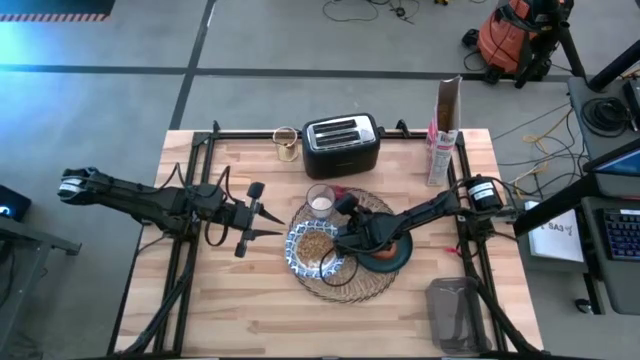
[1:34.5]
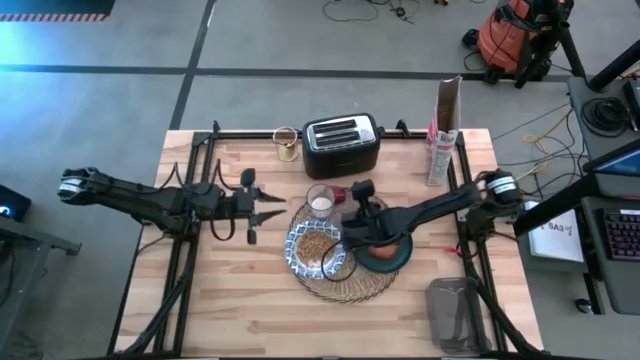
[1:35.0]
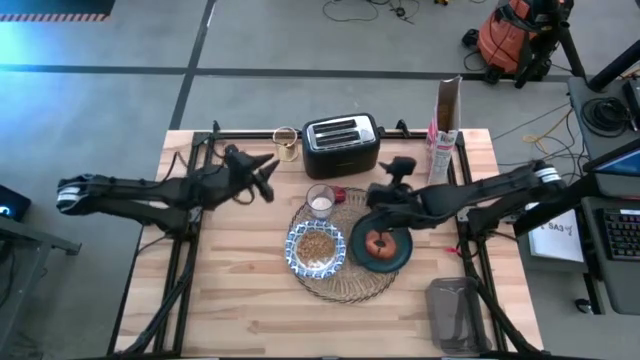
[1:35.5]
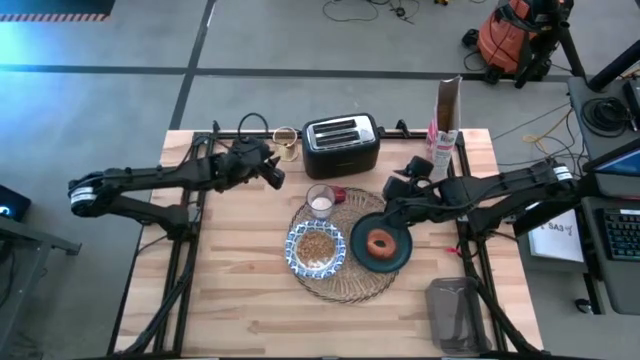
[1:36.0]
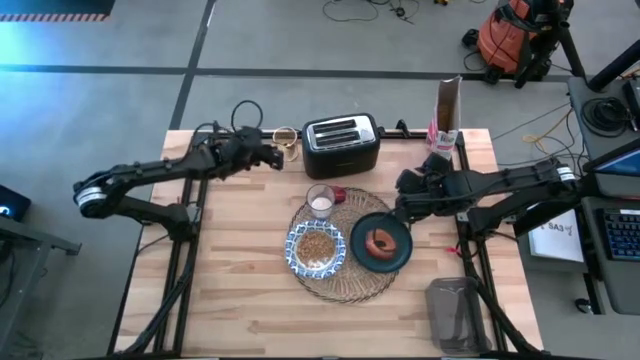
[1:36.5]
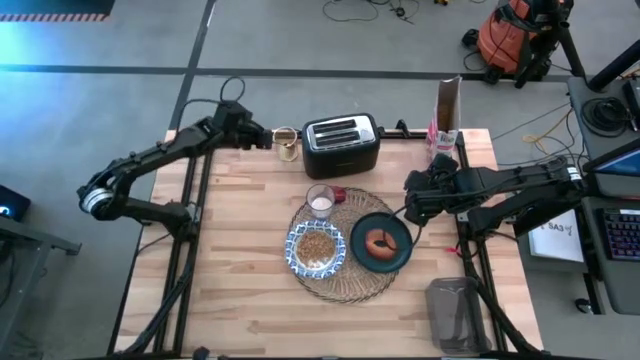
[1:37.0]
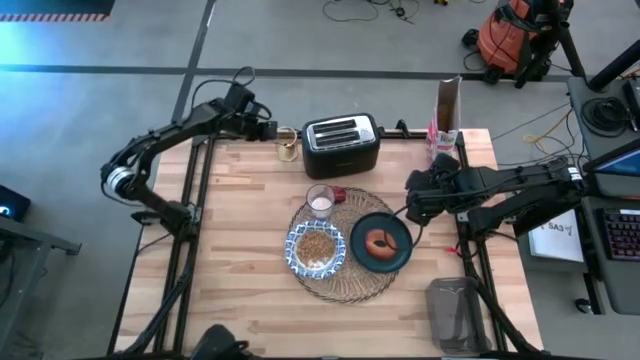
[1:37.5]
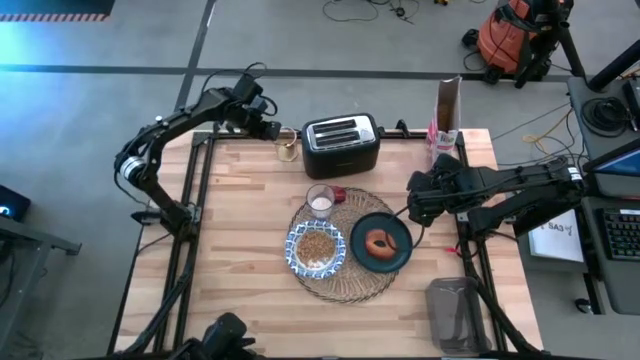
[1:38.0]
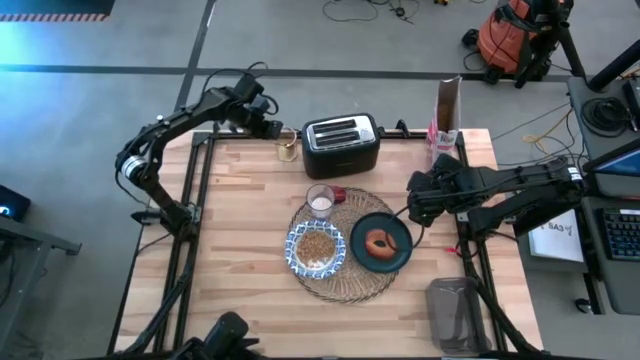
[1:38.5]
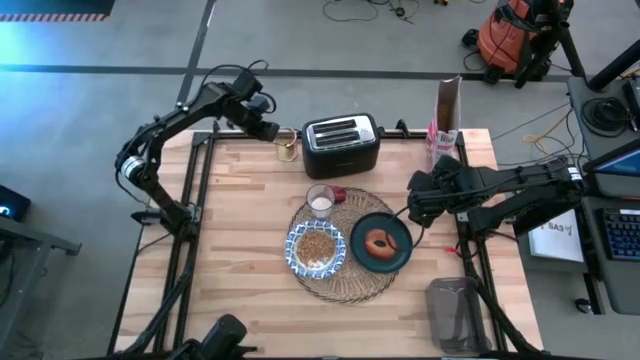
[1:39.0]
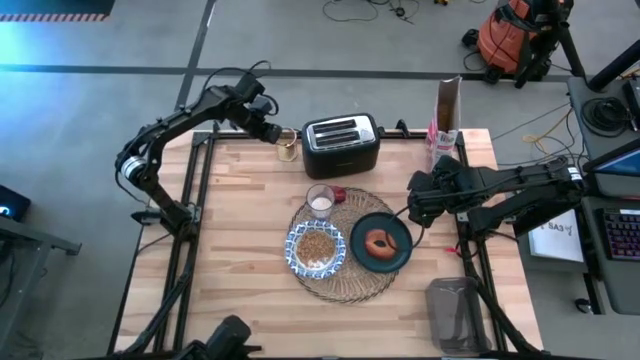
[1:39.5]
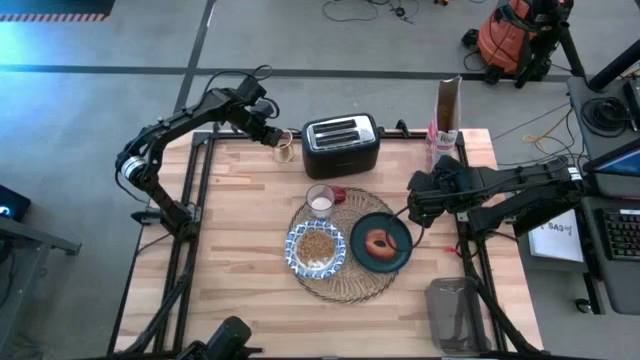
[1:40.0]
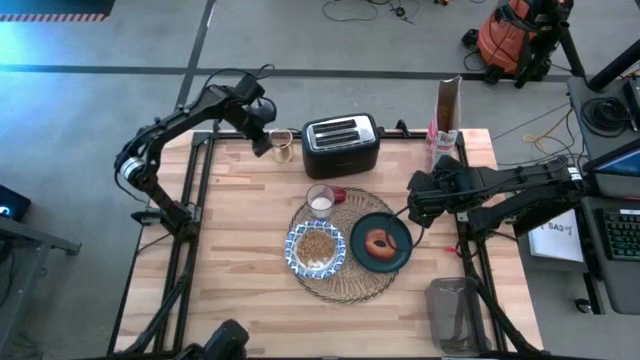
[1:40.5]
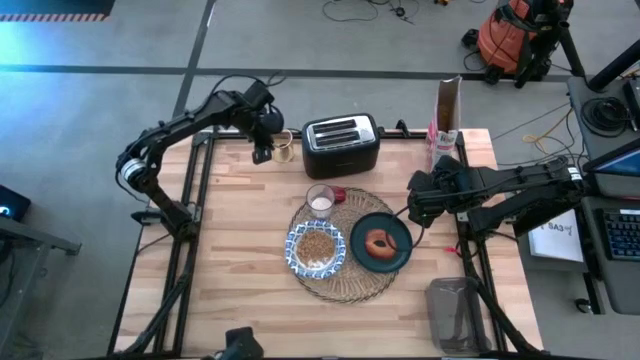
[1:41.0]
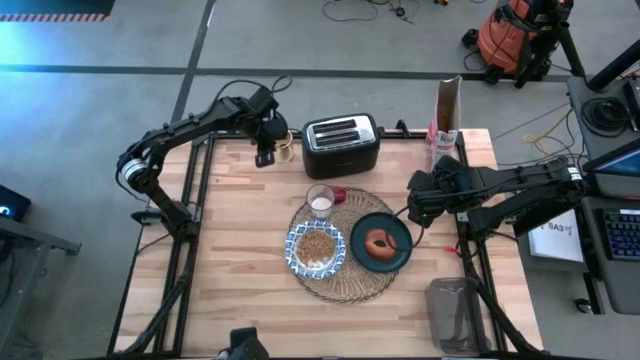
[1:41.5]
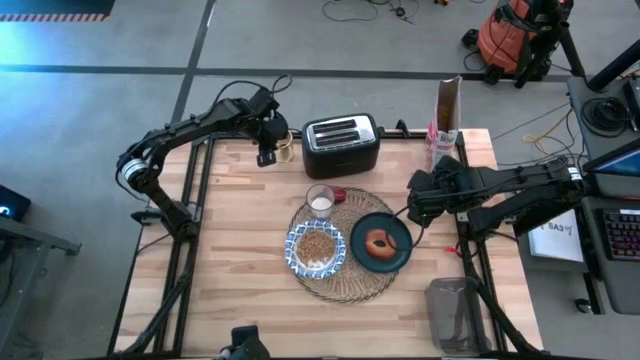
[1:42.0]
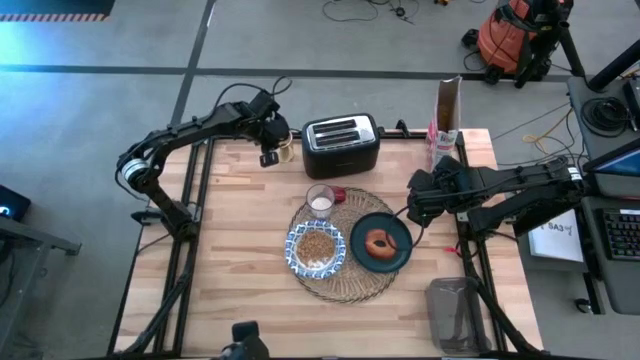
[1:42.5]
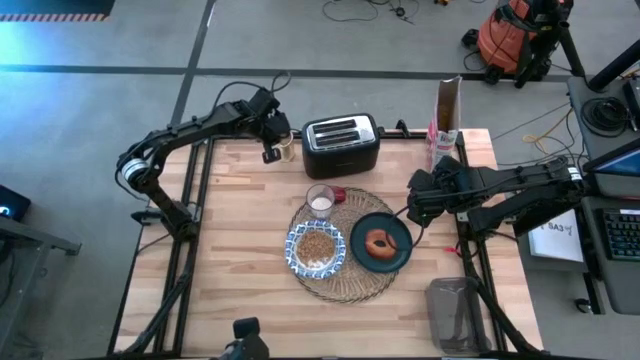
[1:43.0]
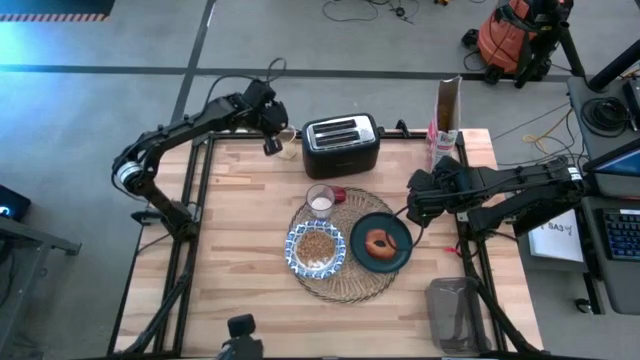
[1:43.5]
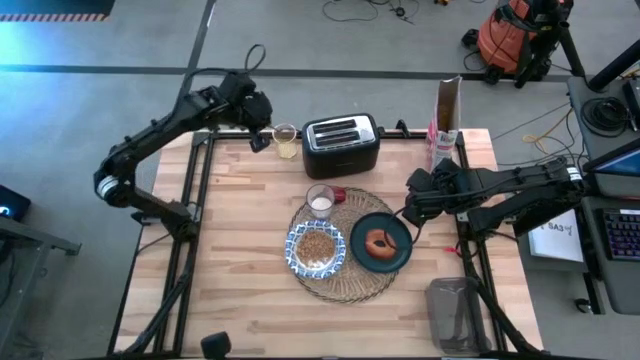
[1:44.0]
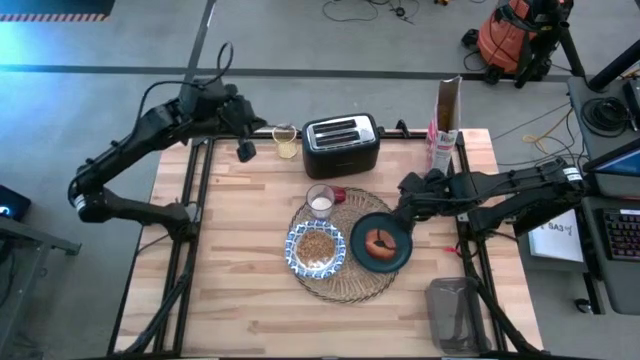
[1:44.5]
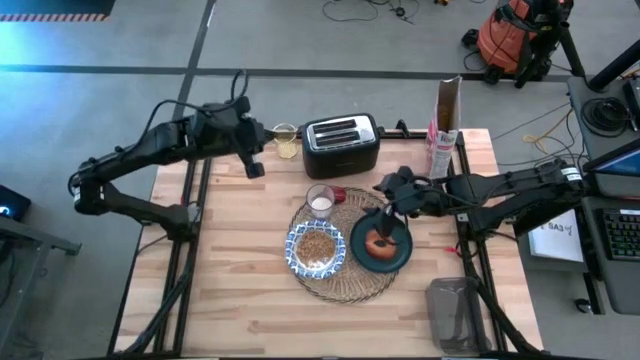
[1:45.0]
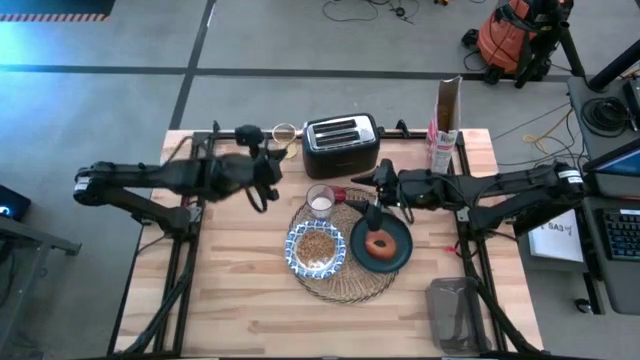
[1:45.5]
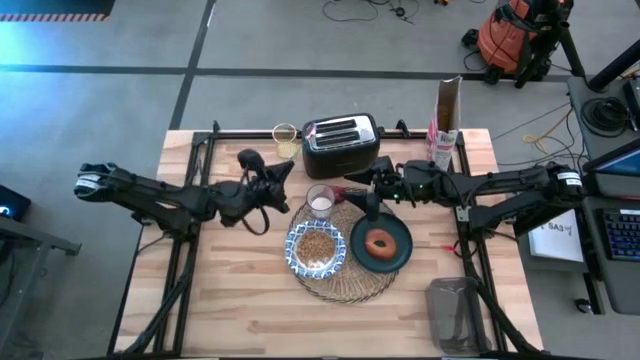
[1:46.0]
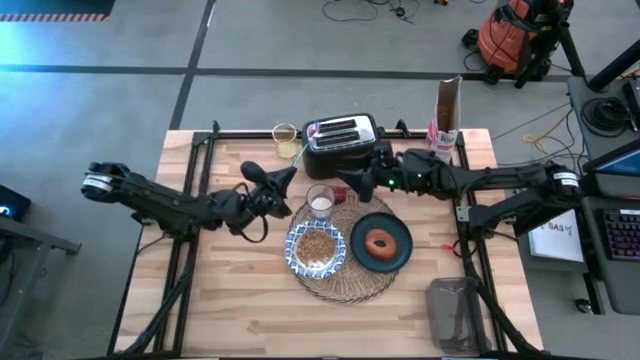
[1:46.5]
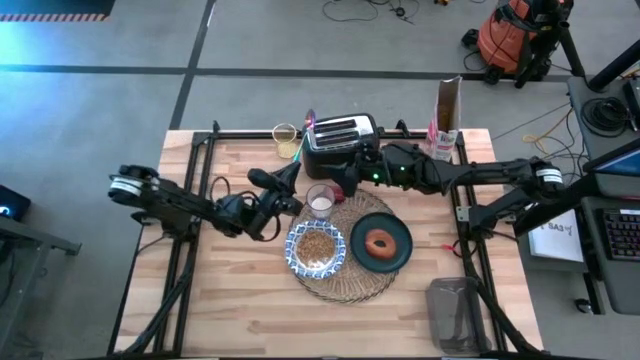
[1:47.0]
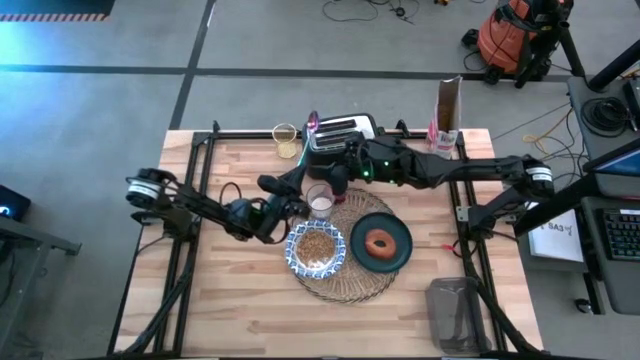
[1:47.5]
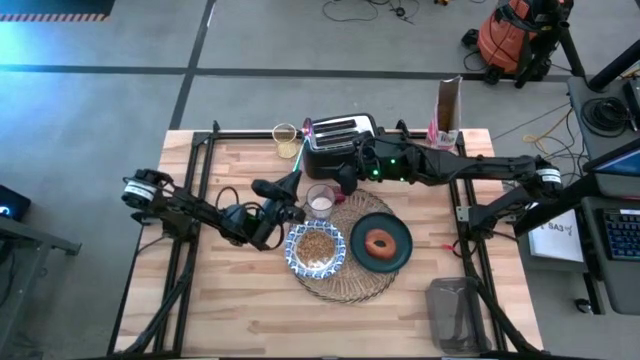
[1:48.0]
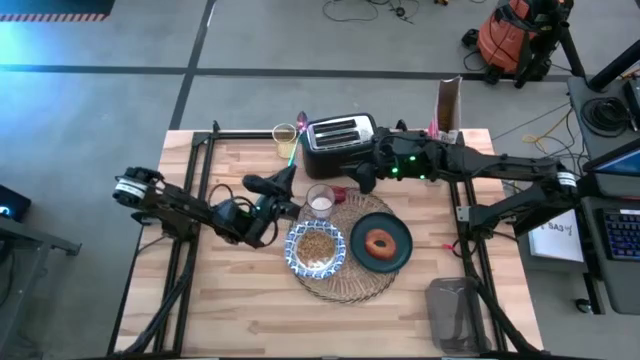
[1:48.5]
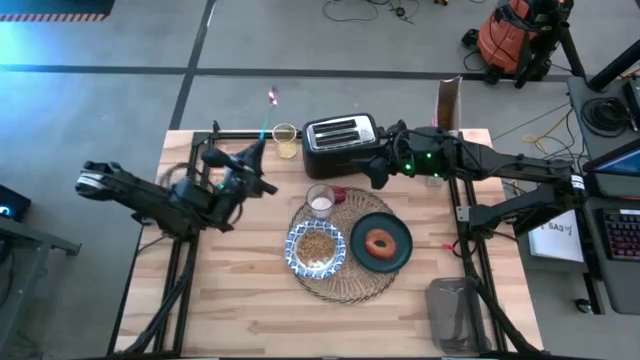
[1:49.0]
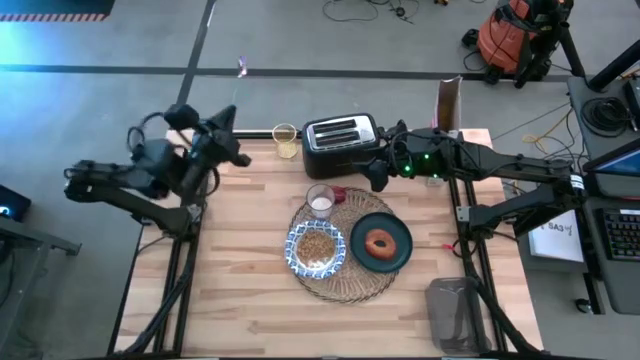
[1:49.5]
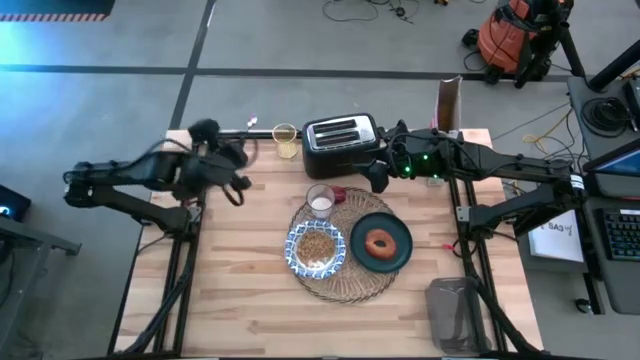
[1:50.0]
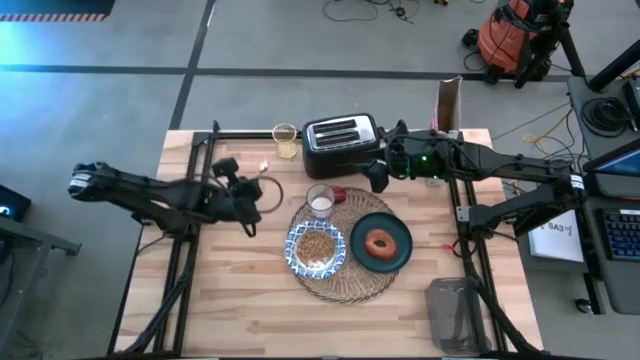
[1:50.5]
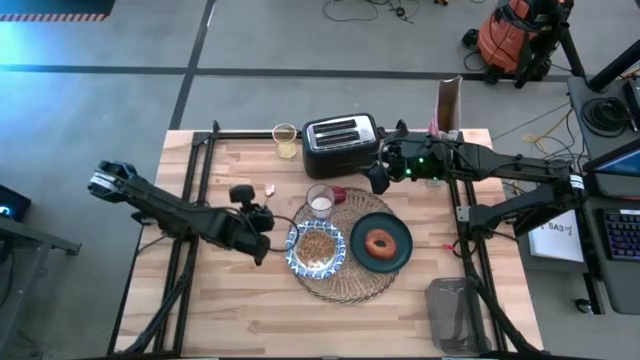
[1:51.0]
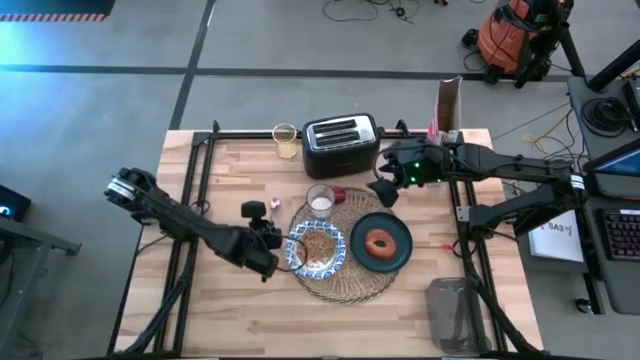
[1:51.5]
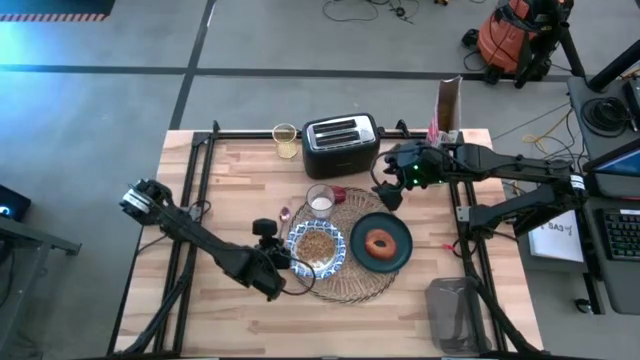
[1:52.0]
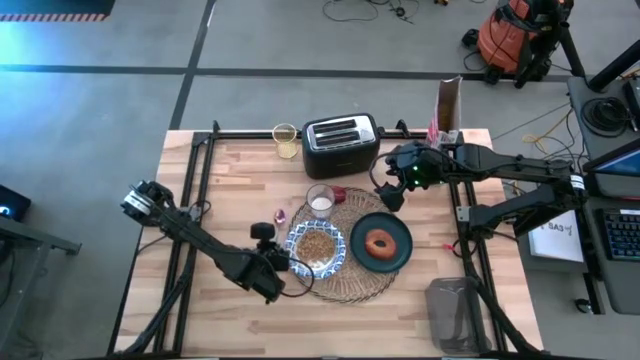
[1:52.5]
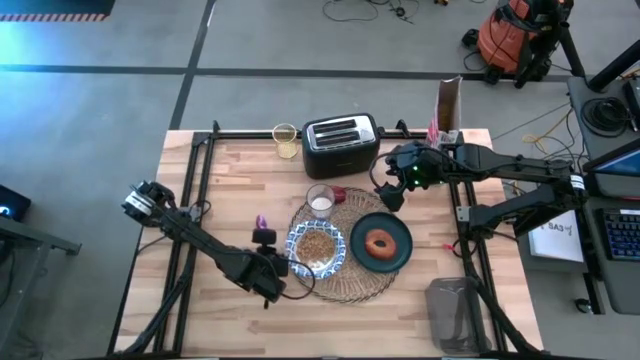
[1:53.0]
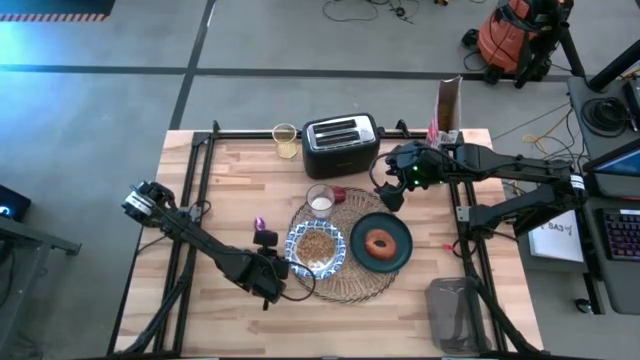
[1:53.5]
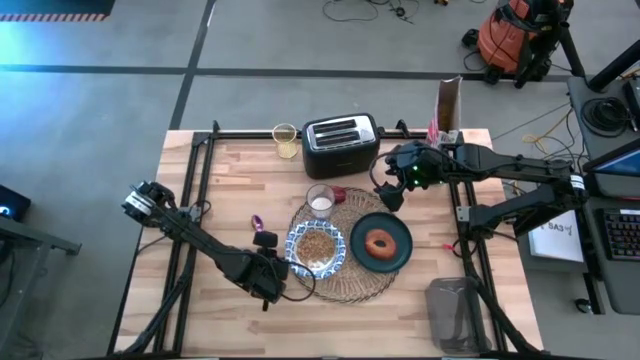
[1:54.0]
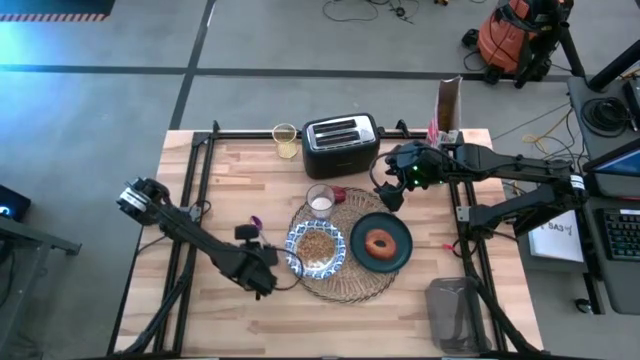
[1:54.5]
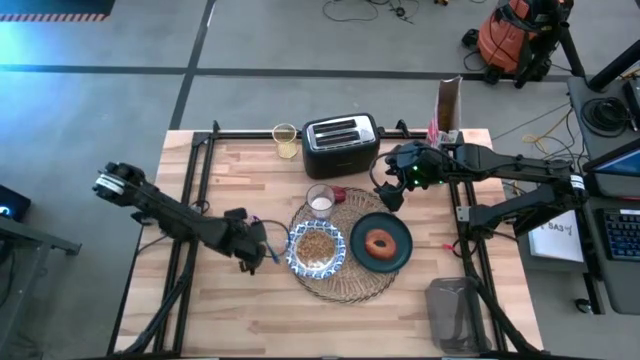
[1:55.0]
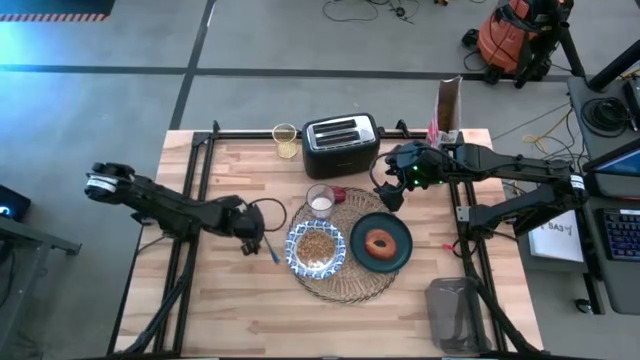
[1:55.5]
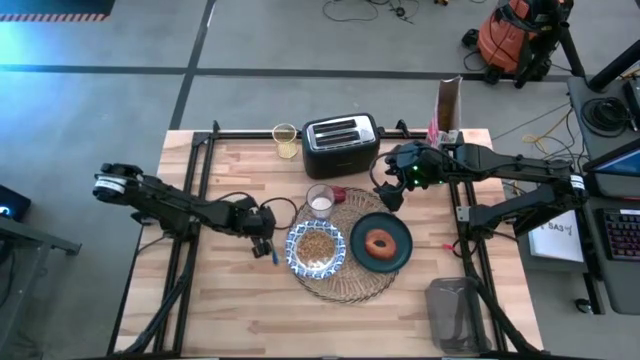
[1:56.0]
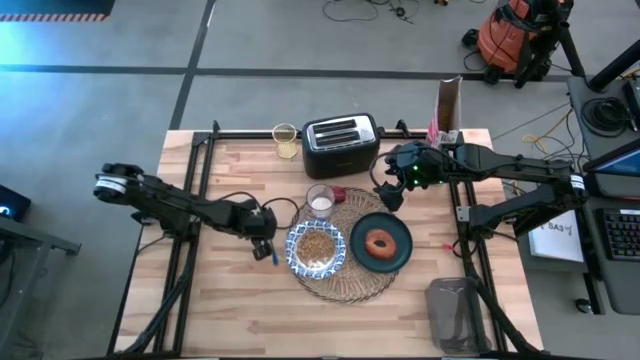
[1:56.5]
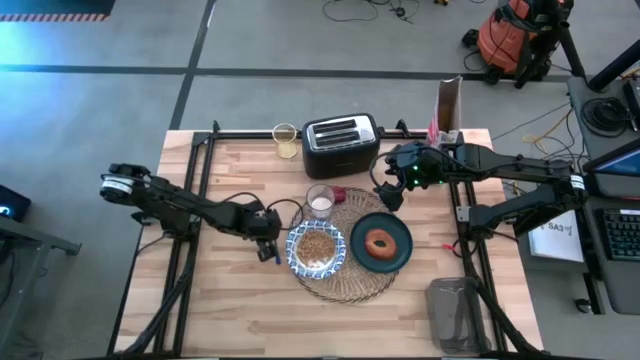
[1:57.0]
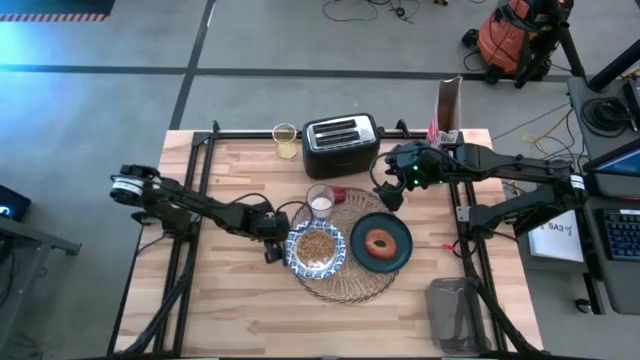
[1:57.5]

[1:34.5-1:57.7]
Task: Arrange a breakfast setting
Put the blue spoon to the left of the brown place mat
